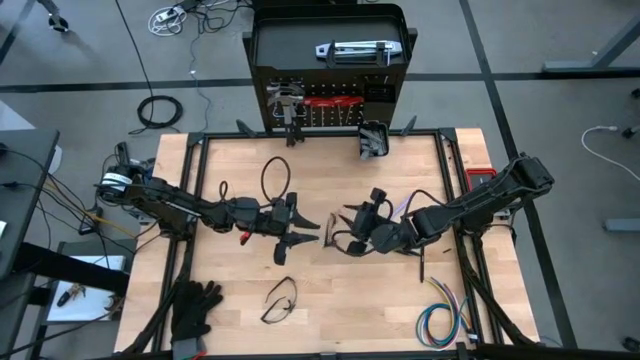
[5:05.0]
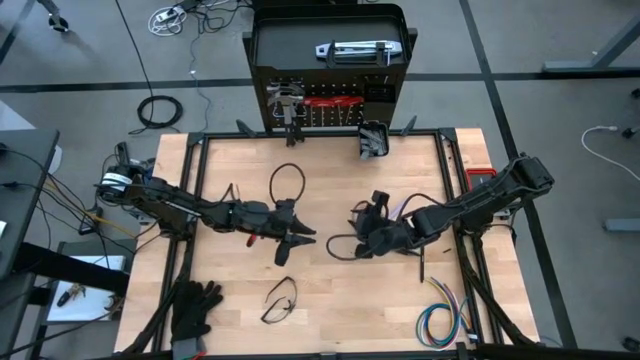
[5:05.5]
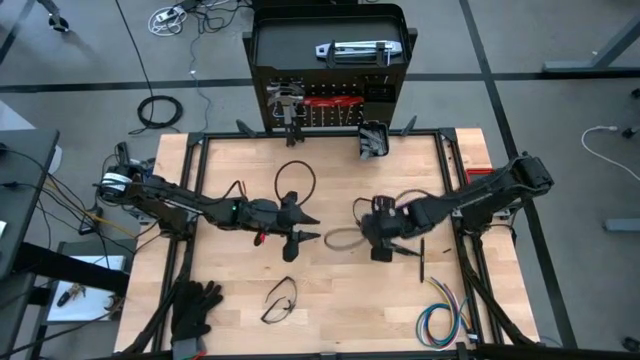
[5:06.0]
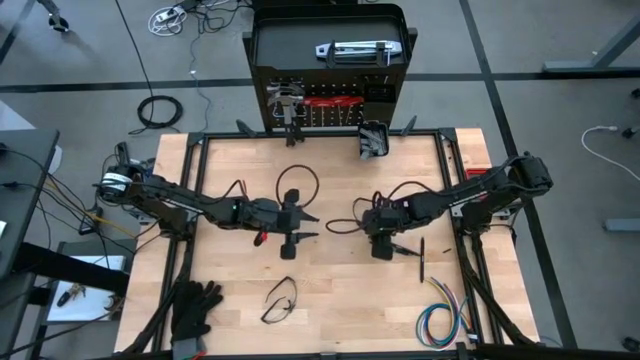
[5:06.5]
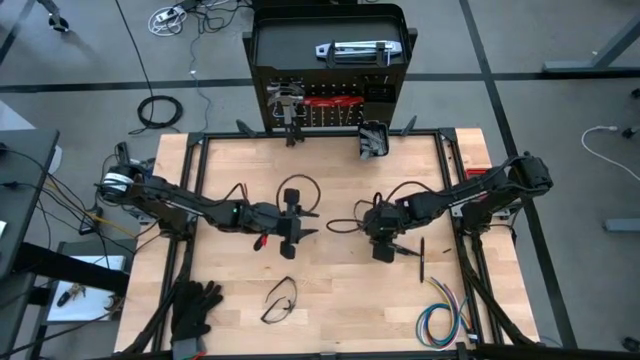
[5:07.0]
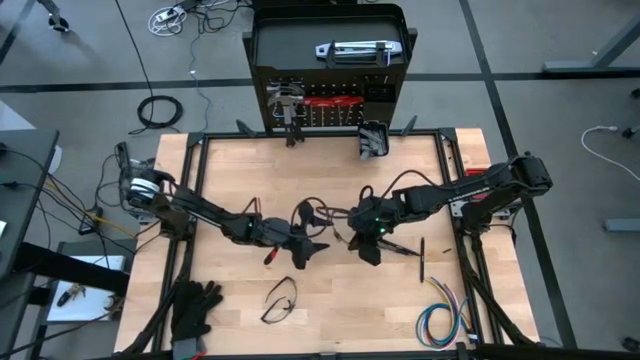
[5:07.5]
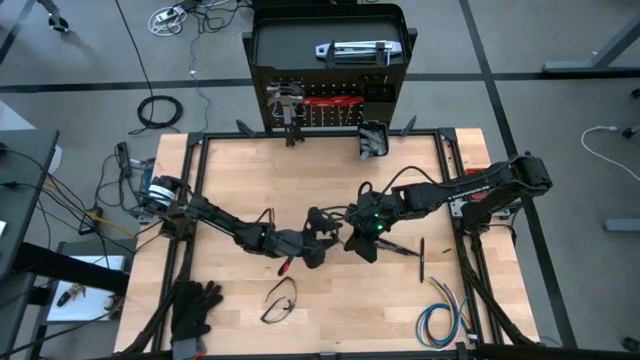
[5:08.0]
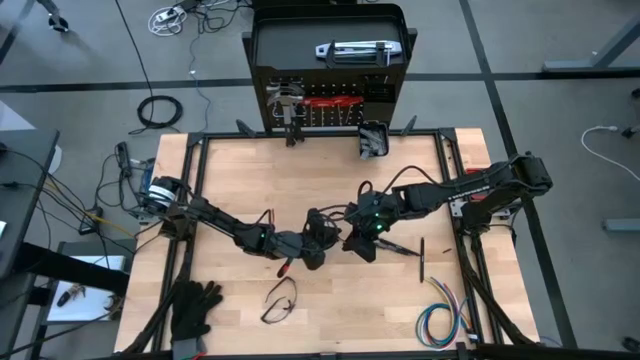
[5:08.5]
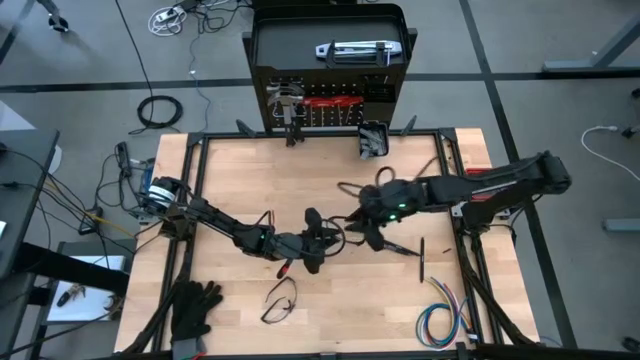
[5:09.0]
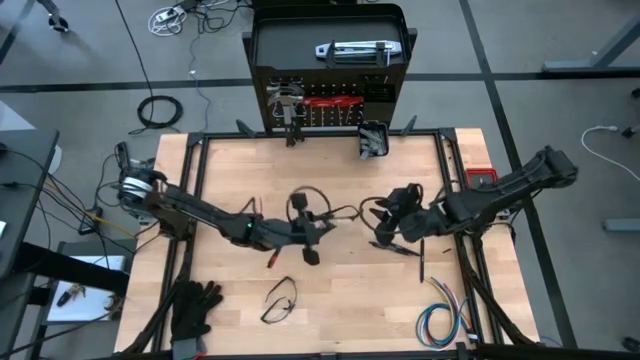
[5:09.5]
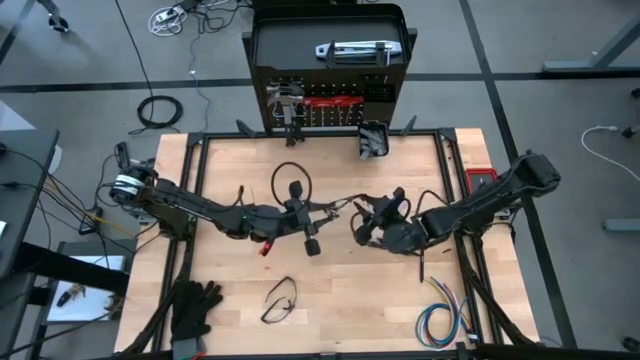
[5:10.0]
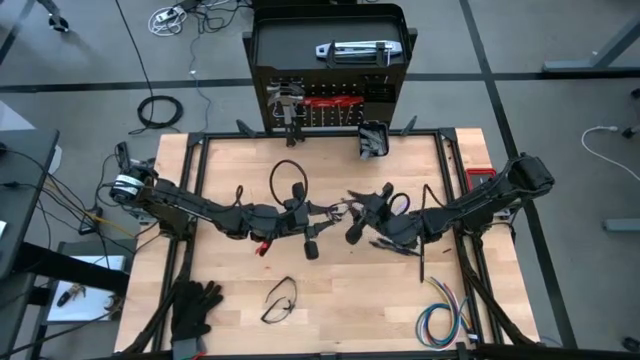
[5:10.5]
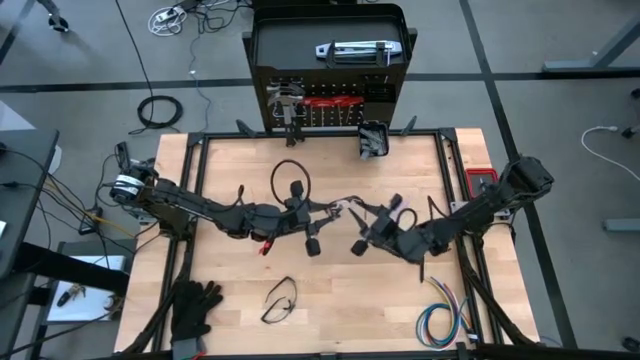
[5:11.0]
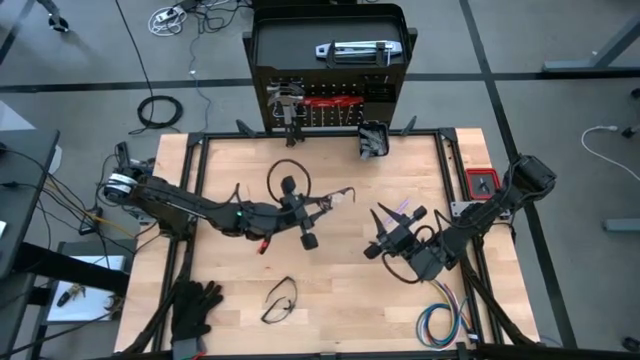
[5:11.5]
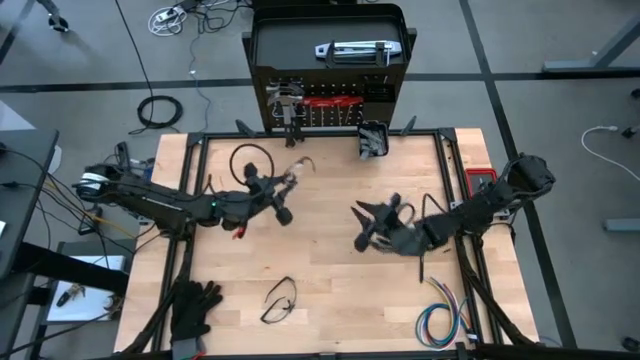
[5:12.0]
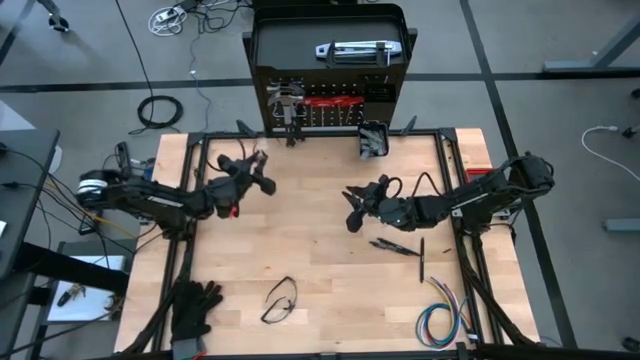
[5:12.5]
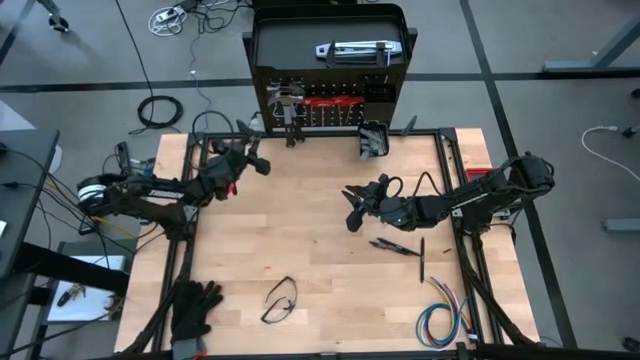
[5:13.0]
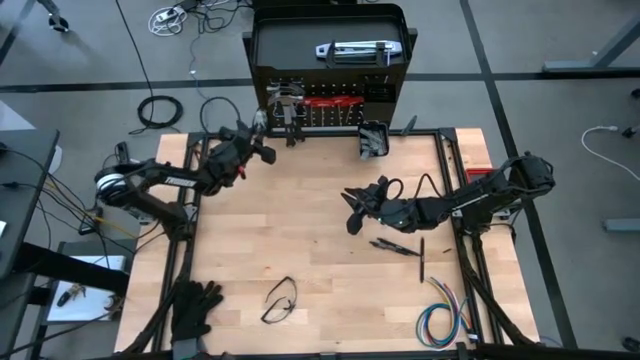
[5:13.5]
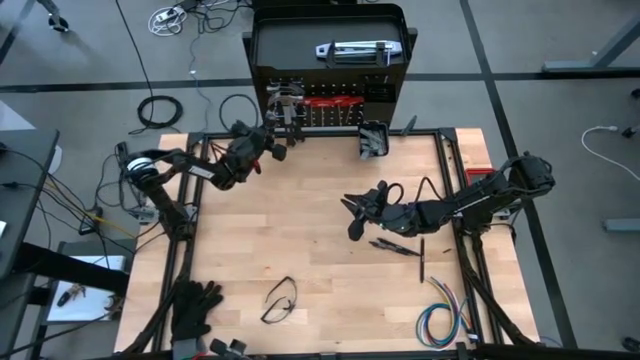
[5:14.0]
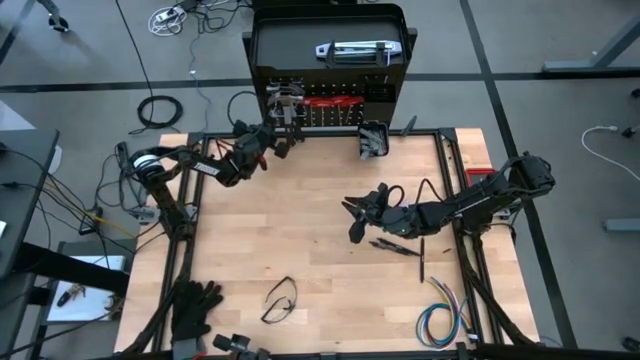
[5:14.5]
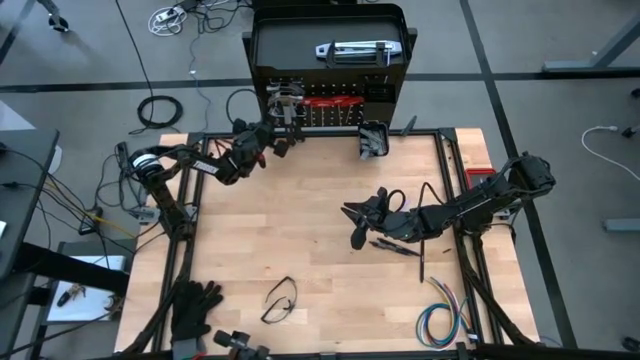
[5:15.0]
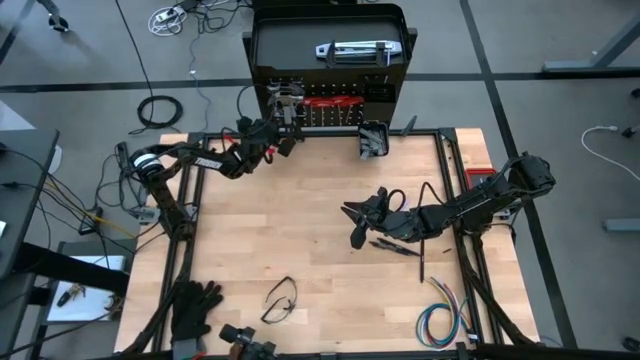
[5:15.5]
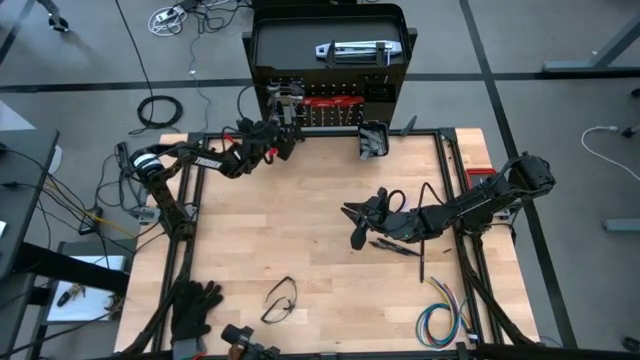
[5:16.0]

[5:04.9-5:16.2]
Task: Hang tools onto peg board
Hang the top glasses on the pegboard

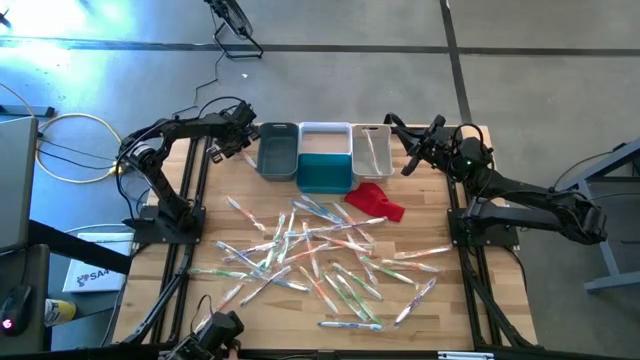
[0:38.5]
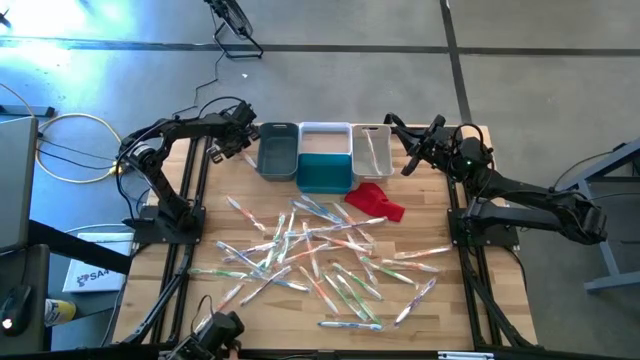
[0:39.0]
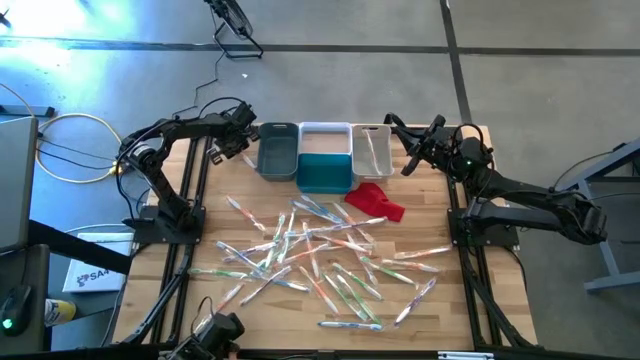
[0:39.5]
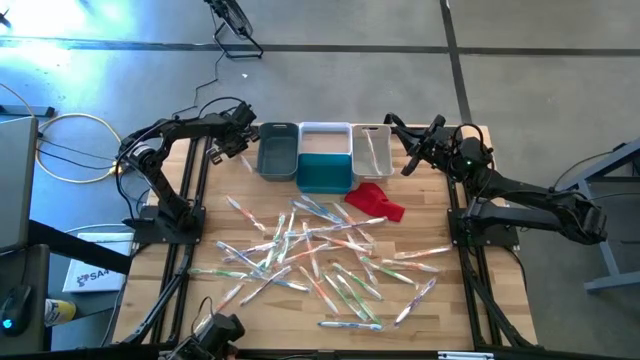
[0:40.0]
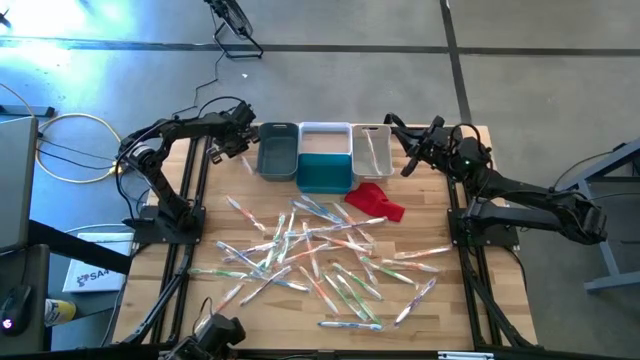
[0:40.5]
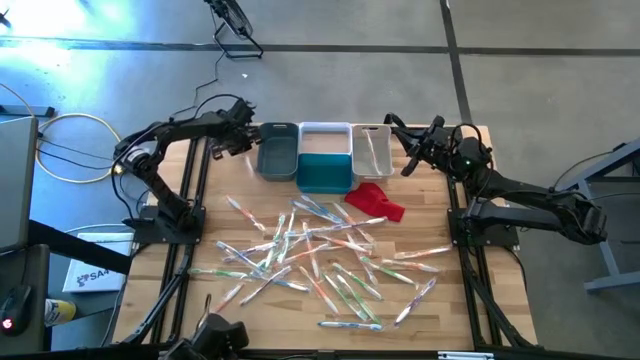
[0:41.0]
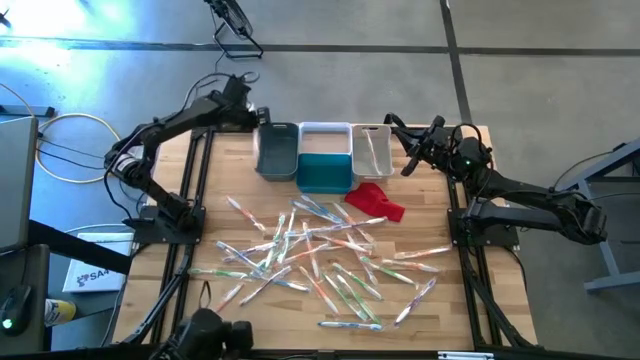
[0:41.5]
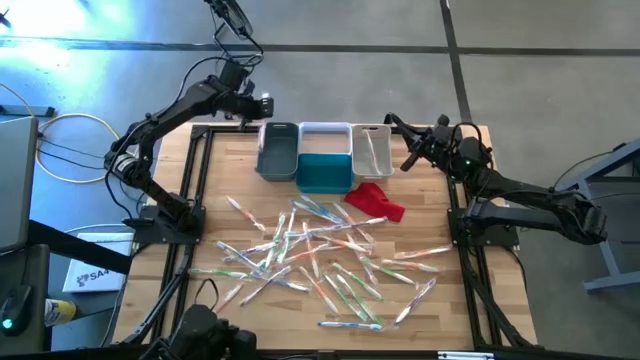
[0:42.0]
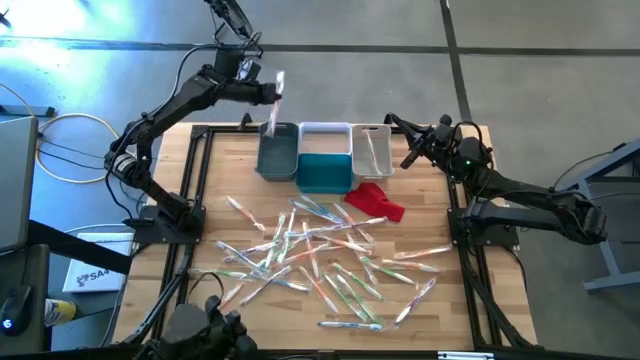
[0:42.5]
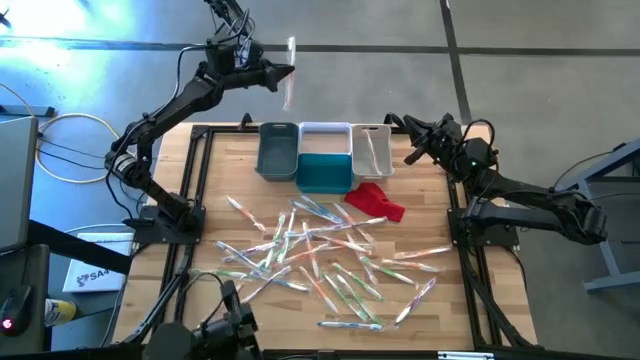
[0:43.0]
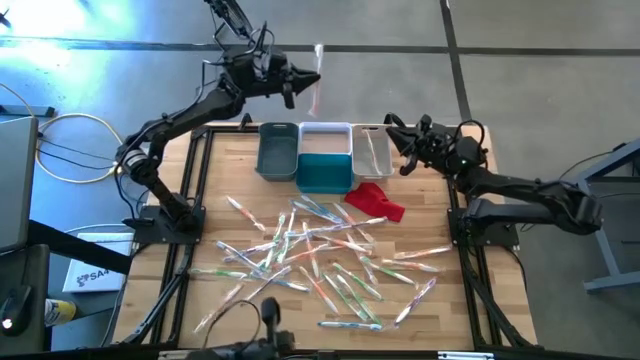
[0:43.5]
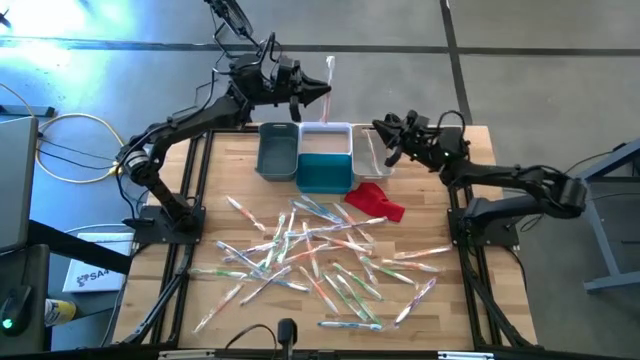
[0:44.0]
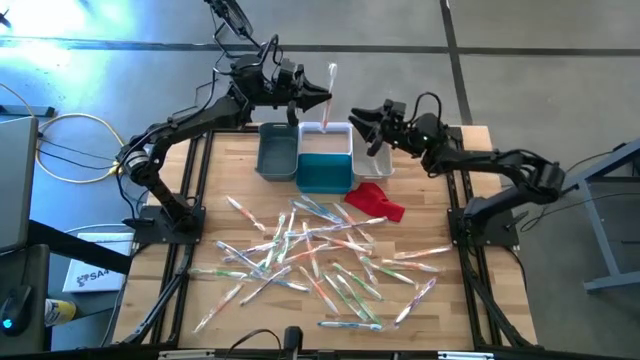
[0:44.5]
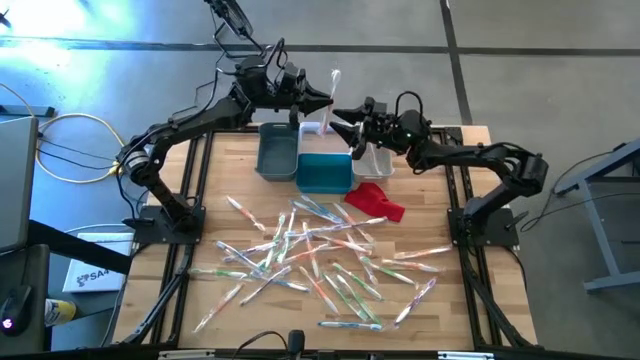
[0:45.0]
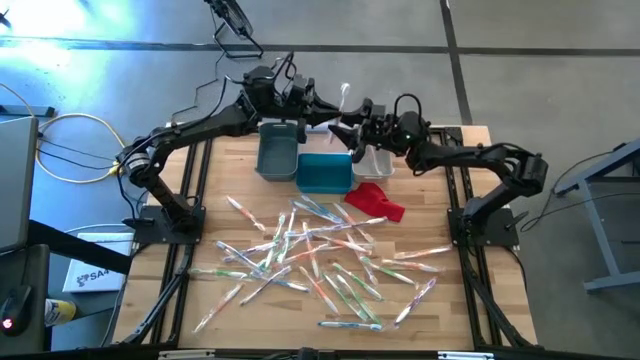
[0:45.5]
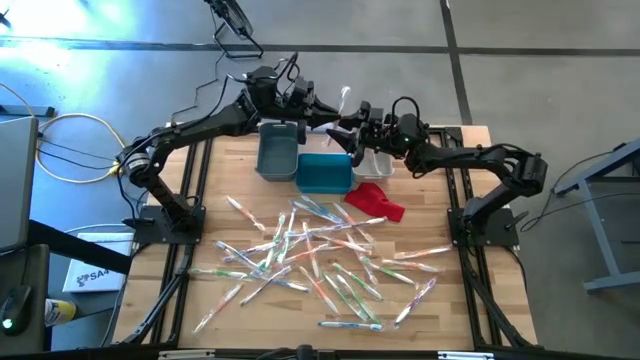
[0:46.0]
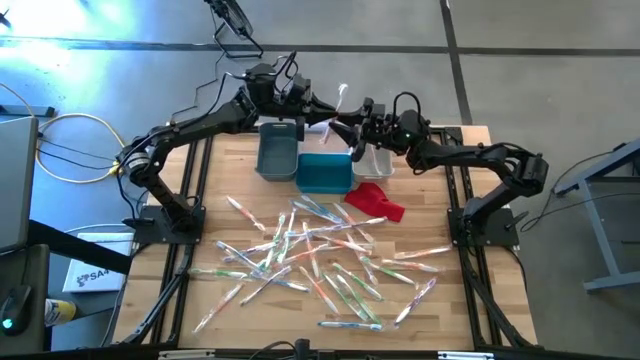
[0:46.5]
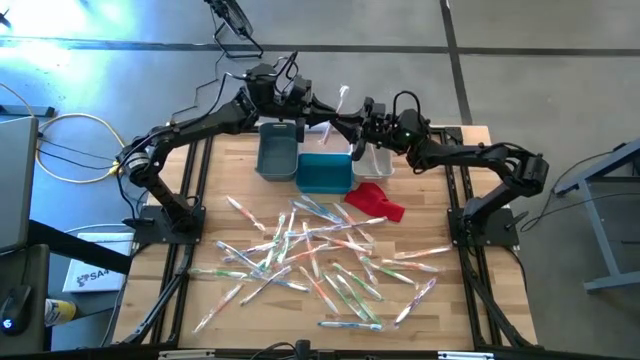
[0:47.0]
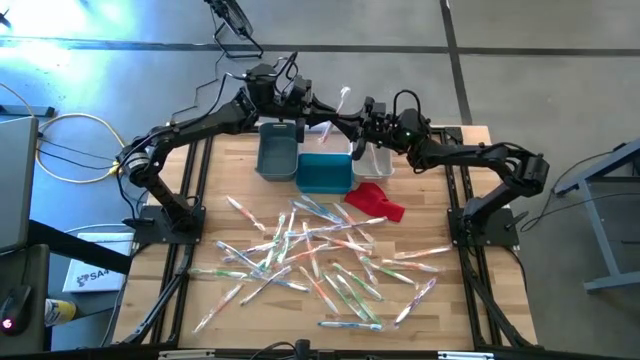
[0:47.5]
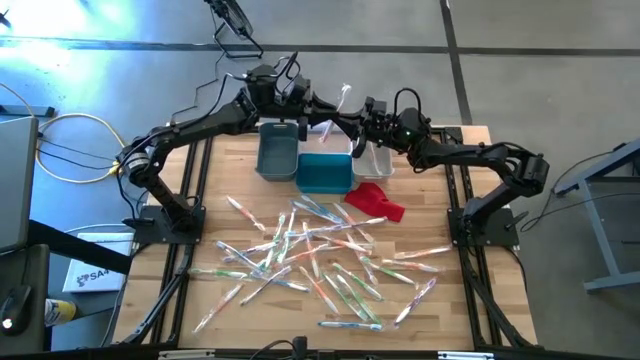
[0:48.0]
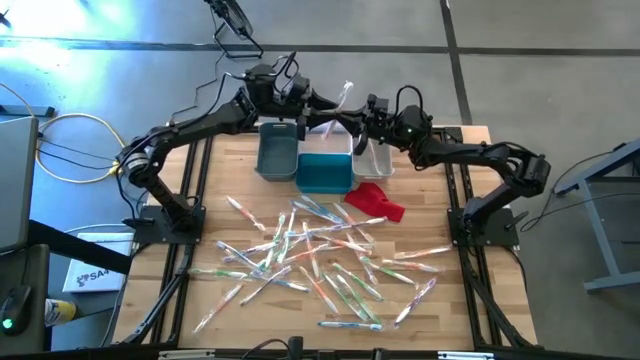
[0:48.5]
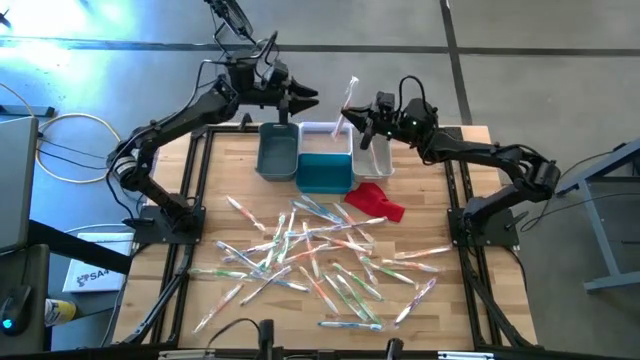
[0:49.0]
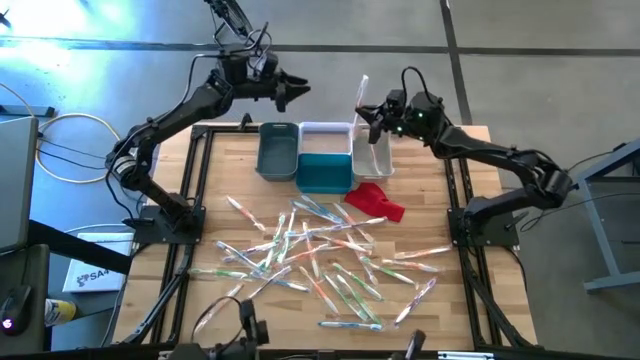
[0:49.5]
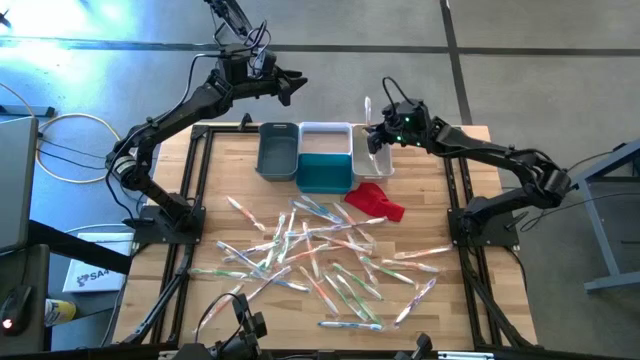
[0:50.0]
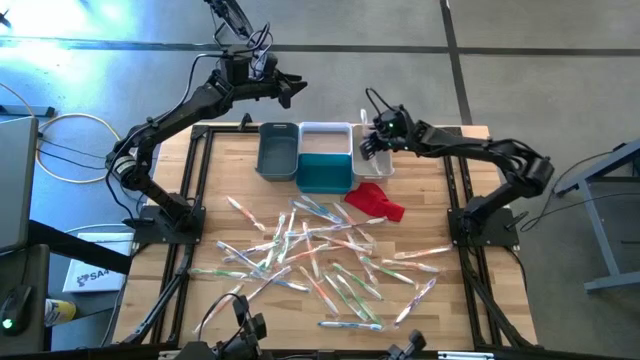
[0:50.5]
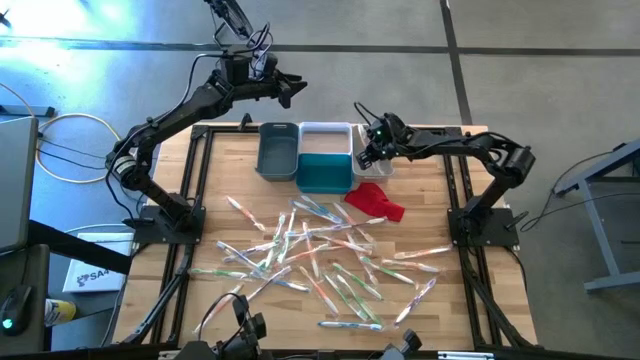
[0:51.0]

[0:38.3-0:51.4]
Task: Pick & Place Toothbrushes
Put the orange toothbrush into the white bin
